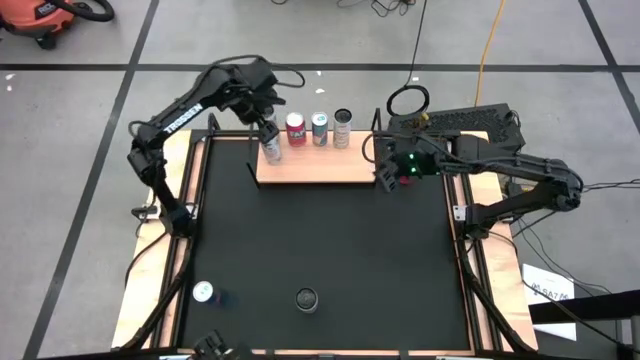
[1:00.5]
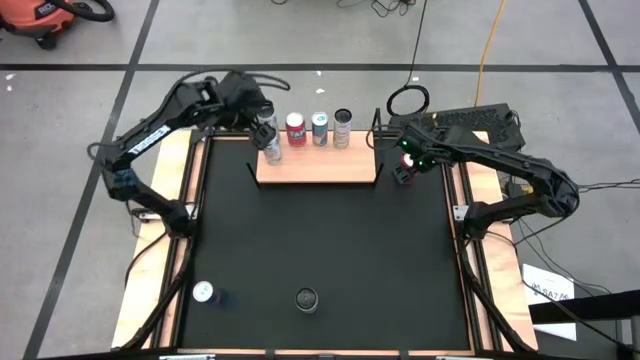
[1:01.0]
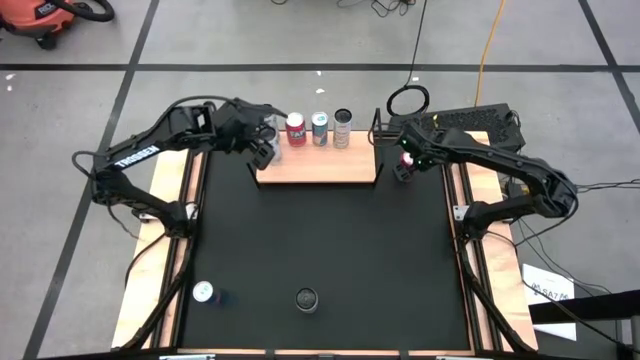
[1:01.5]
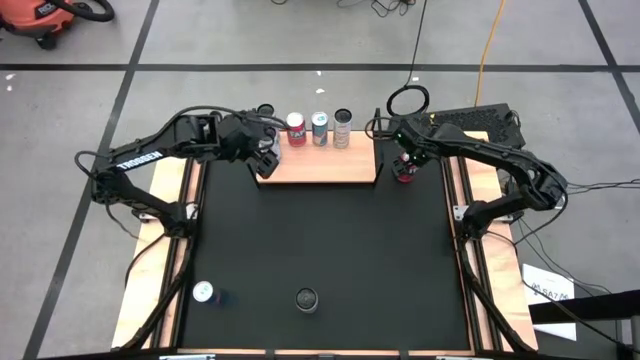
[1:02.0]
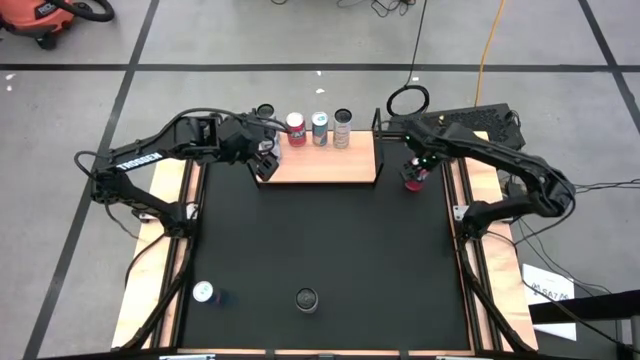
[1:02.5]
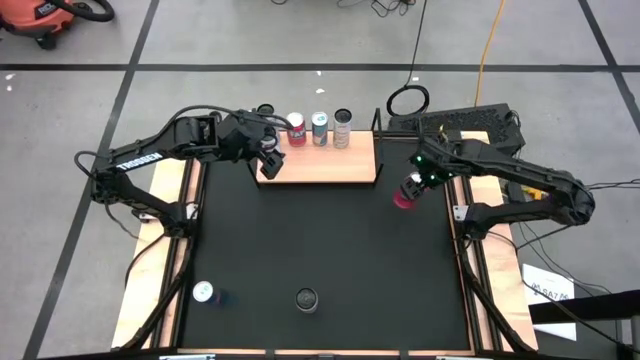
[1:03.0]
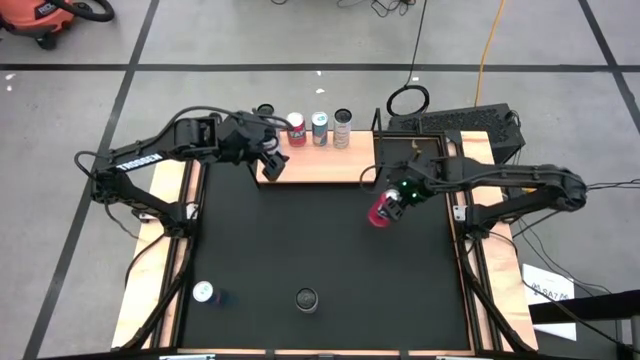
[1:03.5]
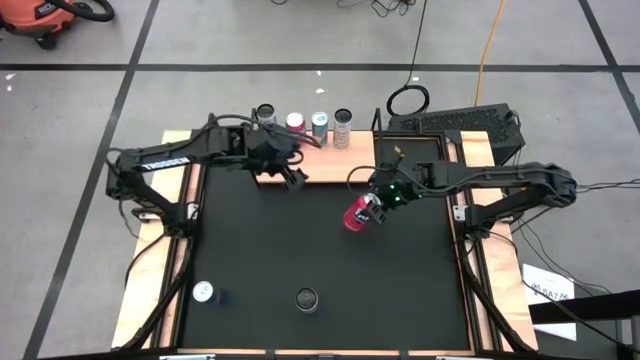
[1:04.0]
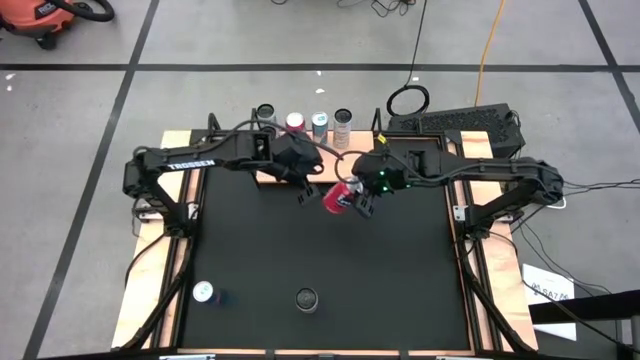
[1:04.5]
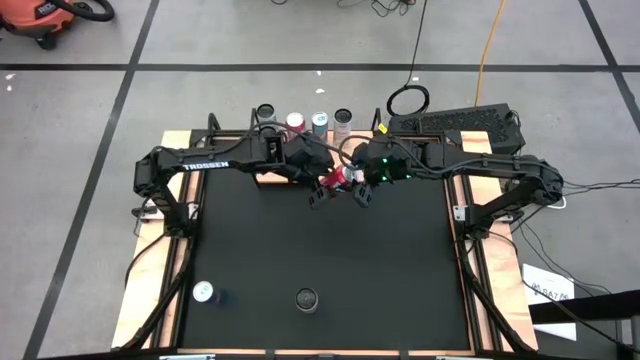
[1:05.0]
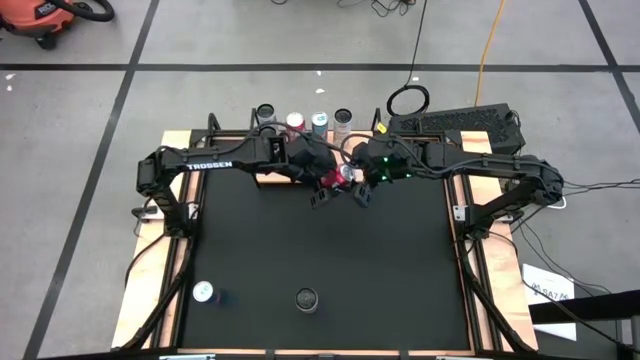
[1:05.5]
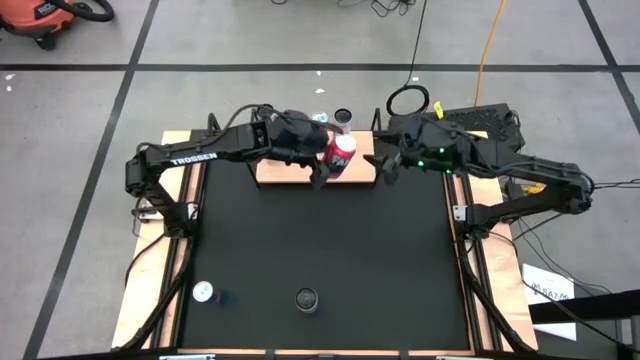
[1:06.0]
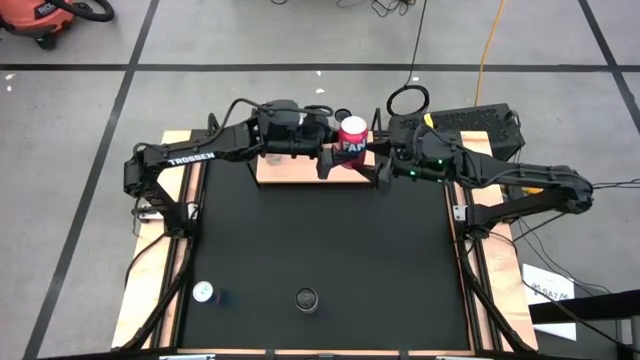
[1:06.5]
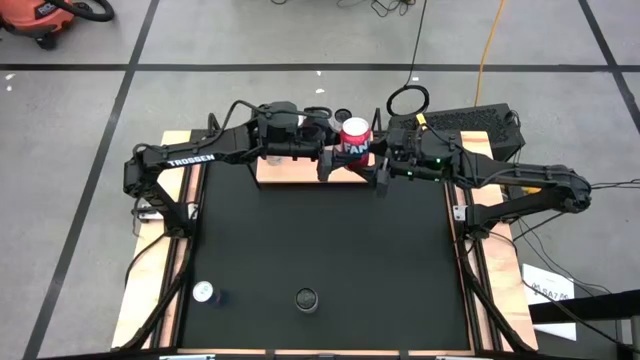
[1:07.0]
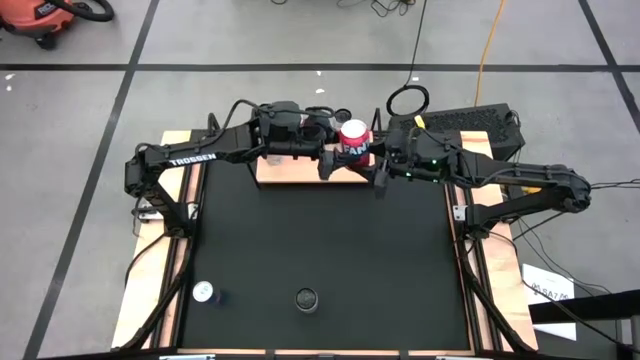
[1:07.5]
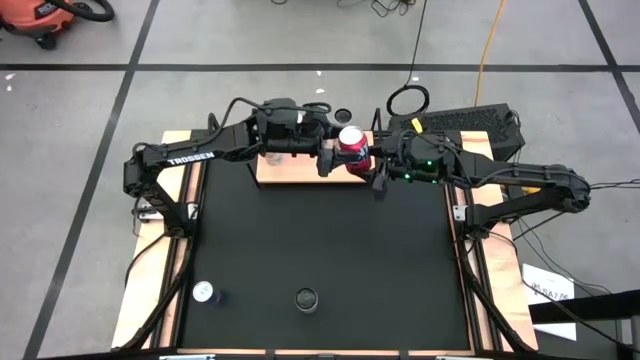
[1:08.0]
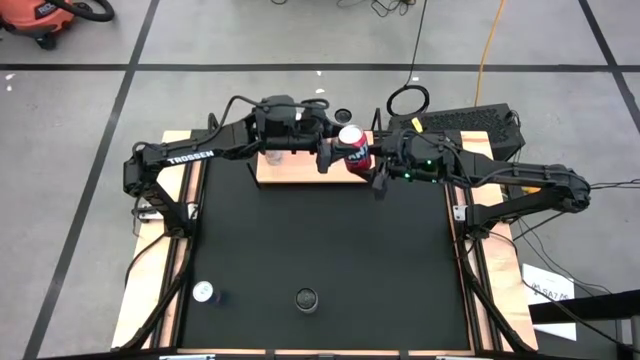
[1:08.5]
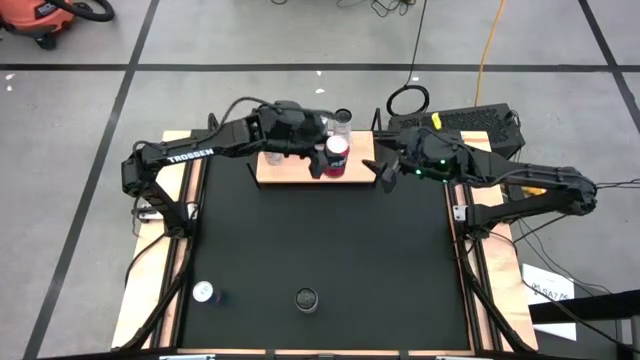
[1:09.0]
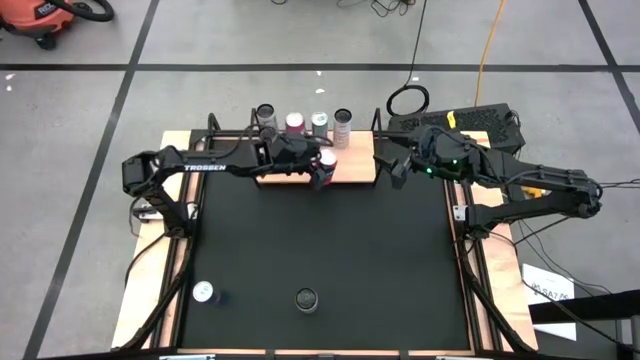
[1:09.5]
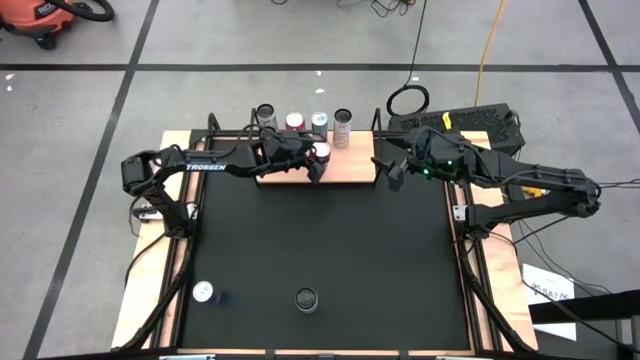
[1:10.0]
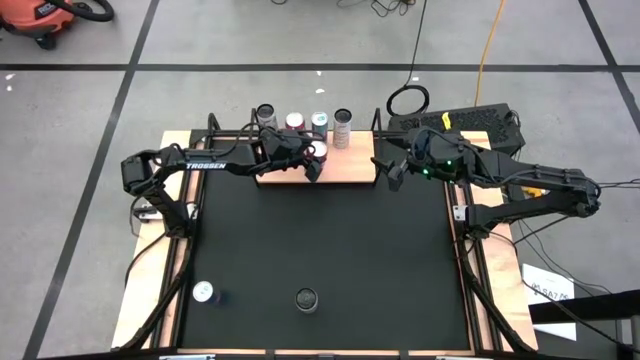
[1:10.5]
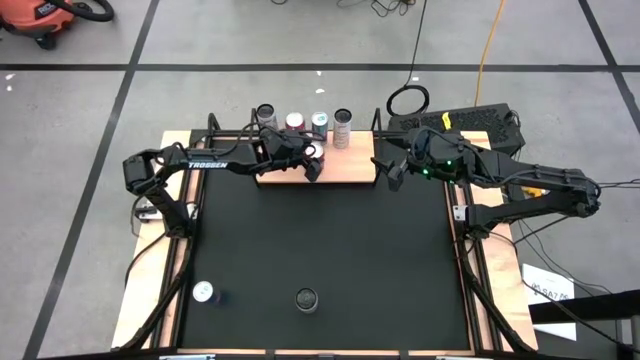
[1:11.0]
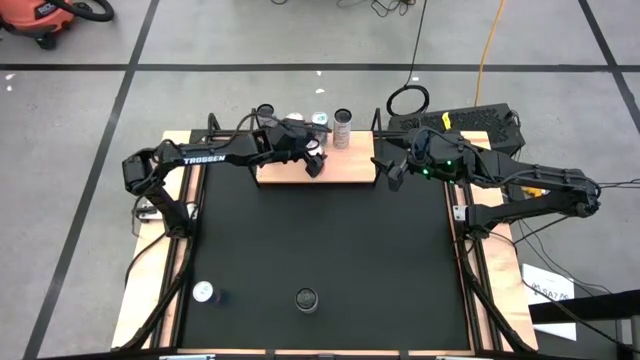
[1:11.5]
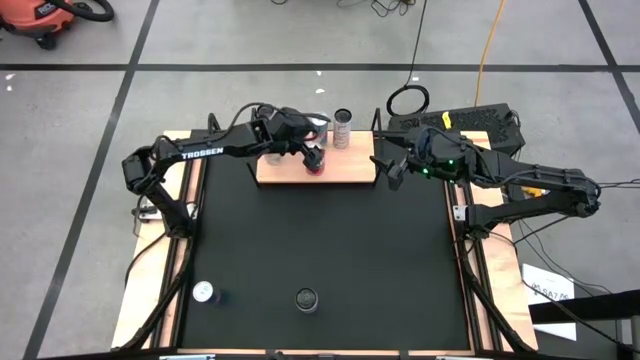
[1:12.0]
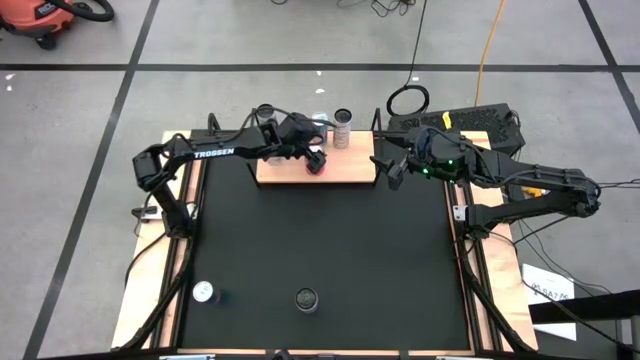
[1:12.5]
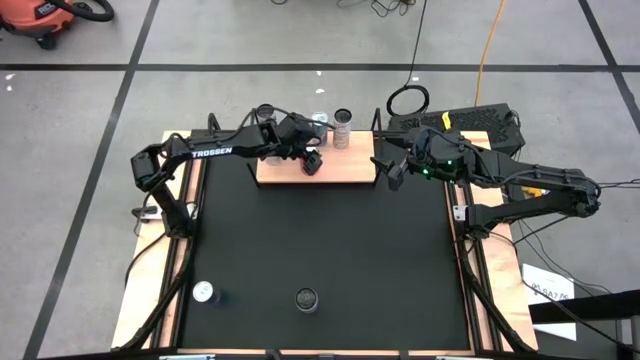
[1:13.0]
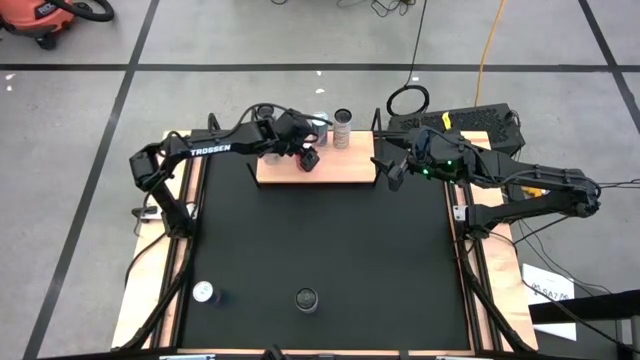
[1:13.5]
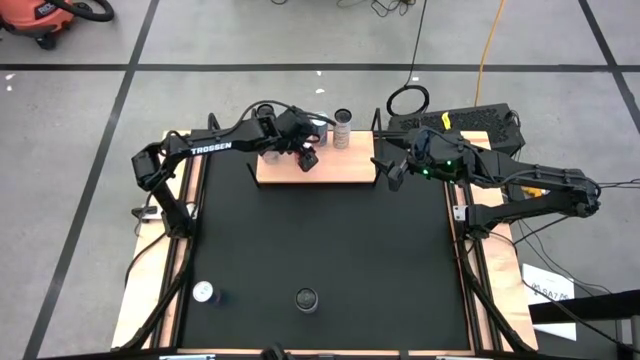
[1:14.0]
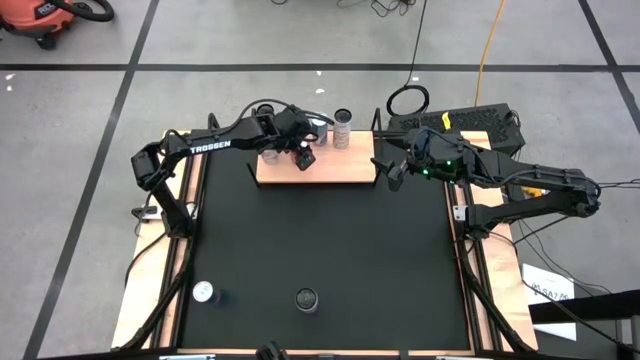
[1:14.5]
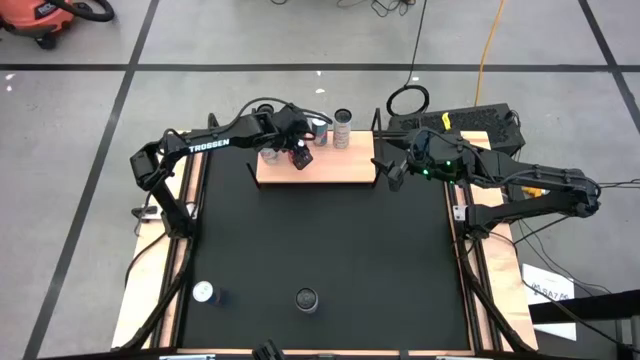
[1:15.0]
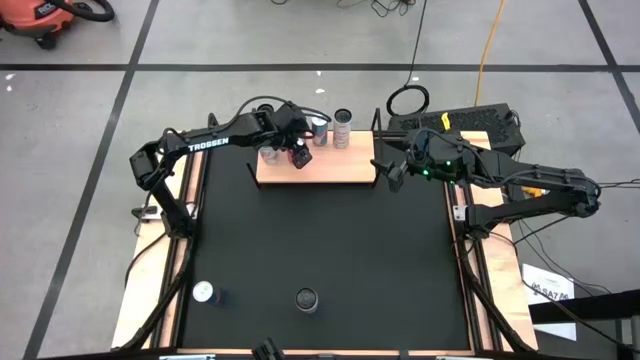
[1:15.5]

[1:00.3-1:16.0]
Task: Place canned beverage on shelf
Put the red soda can aligned with the other red soda cans on the shelf
